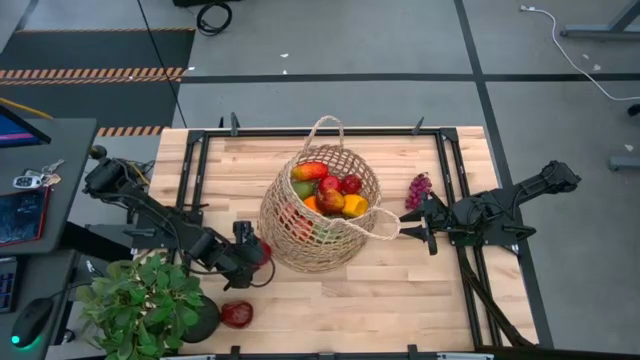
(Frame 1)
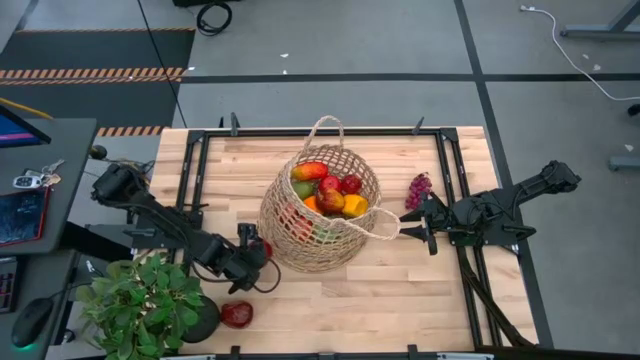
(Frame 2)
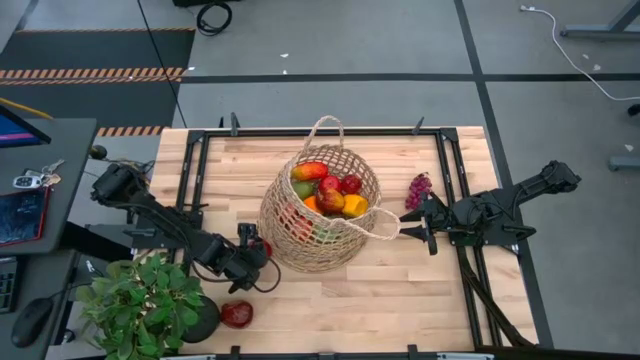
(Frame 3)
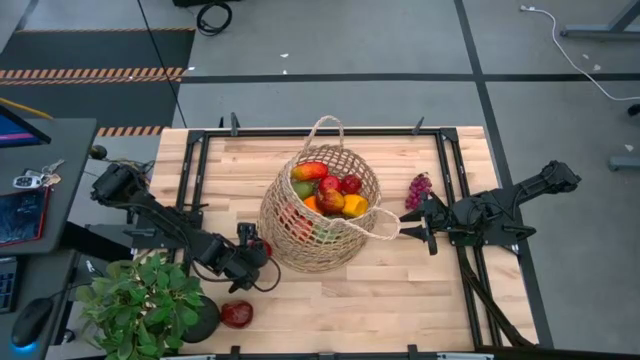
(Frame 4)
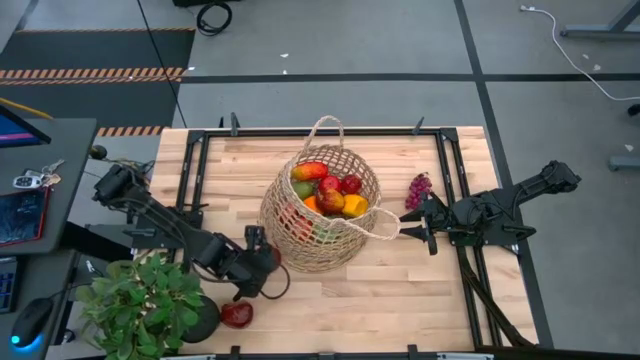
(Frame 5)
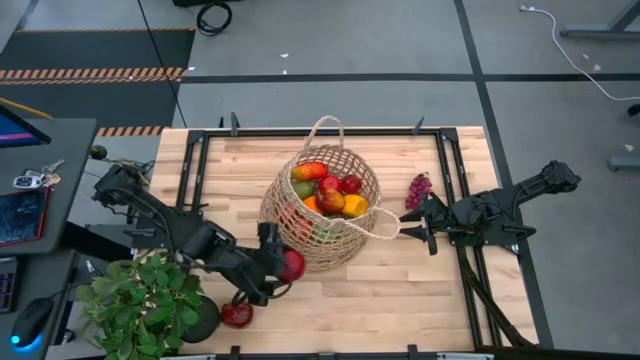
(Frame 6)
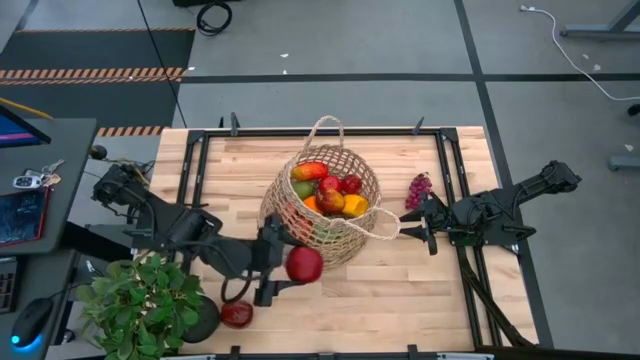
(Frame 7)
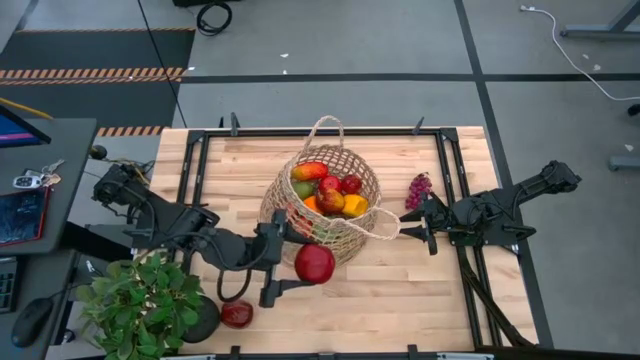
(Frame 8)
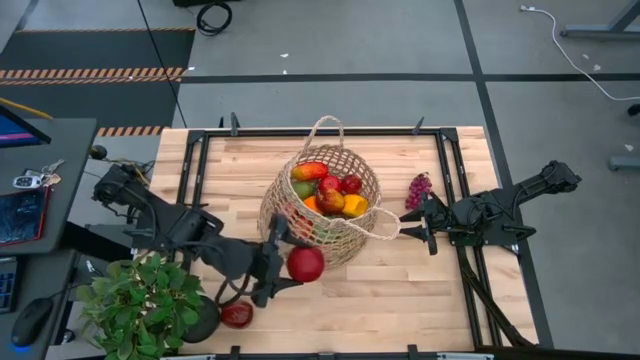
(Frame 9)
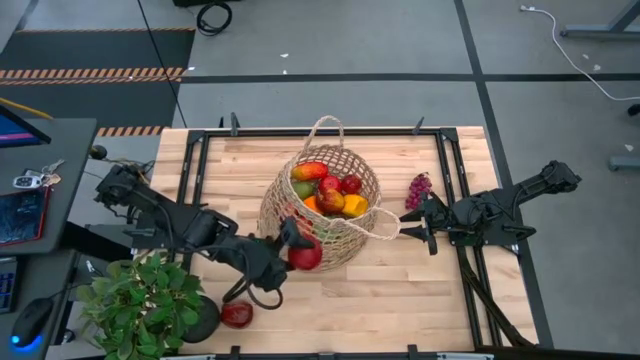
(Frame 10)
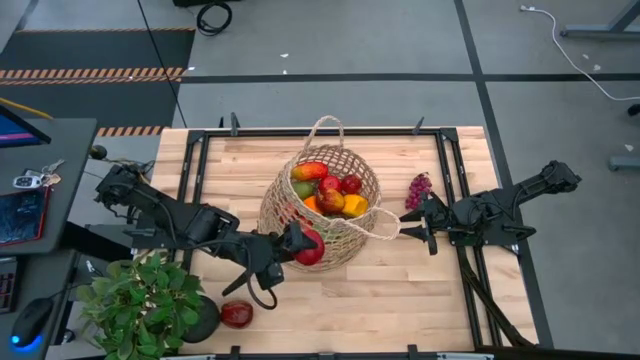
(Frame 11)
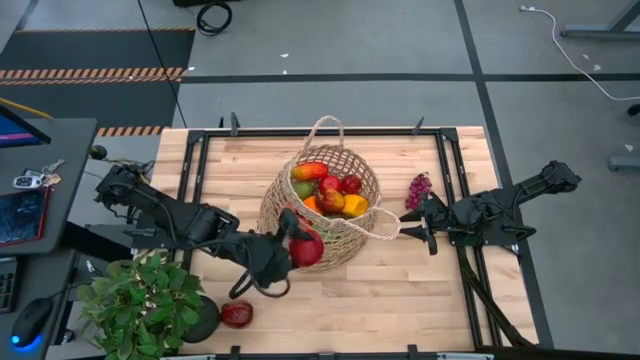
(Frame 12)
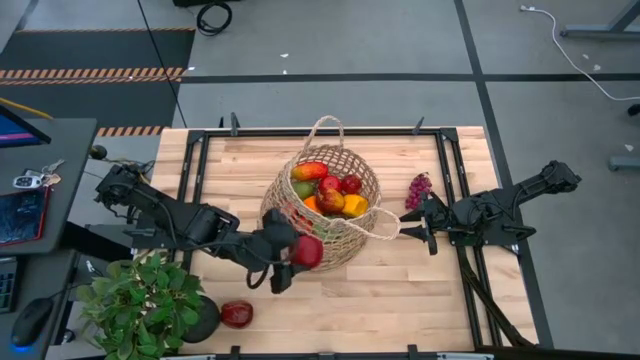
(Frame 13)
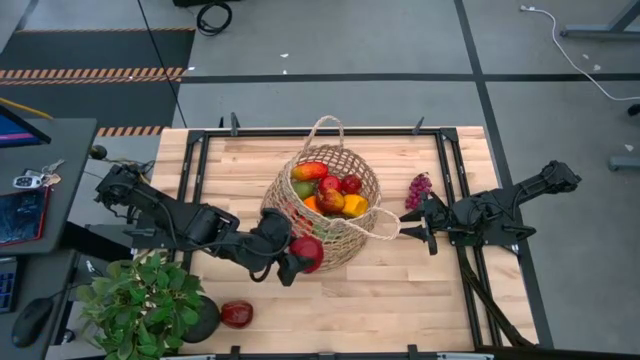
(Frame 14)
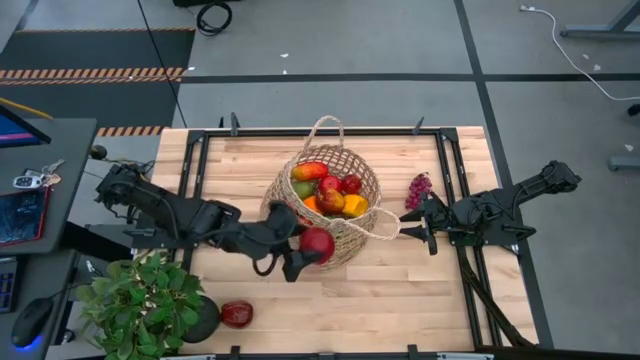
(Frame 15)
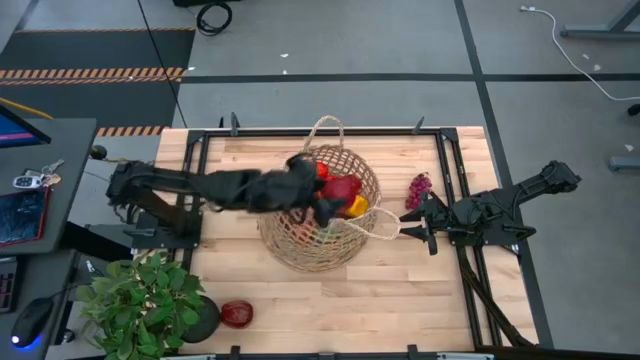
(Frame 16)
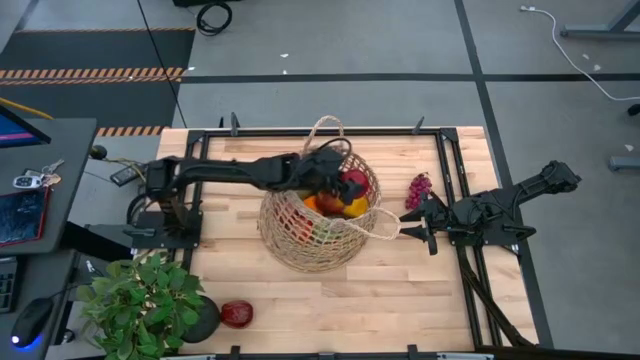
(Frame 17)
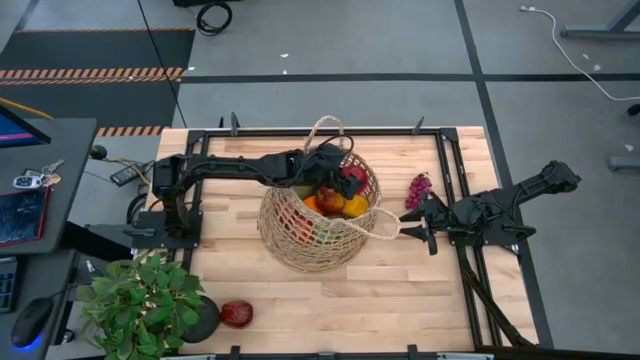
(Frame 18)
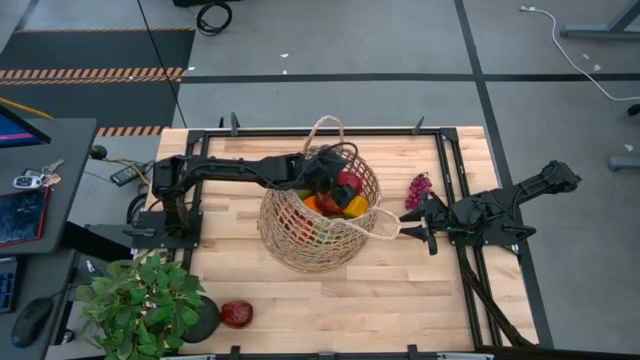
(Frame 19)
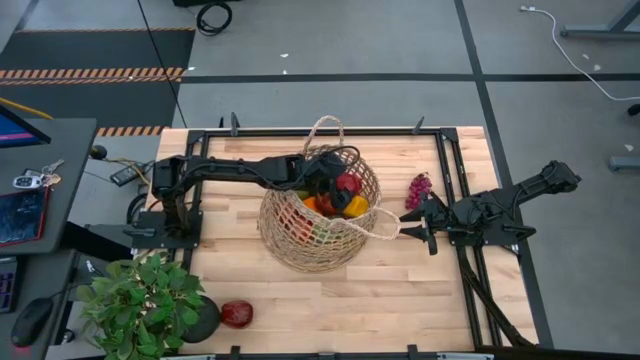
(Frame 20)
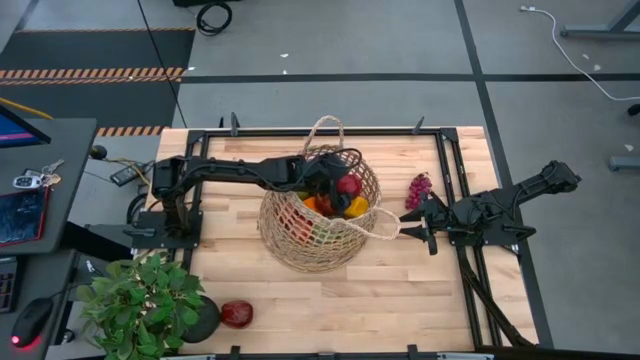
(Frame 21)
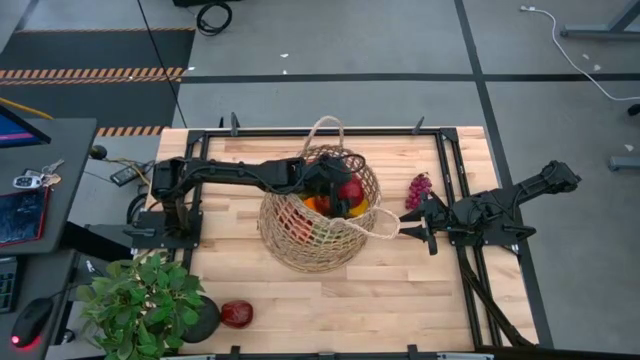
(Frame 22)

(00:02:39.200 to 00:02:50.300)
Task: Build produce basket
Put the pomegranate into the basket

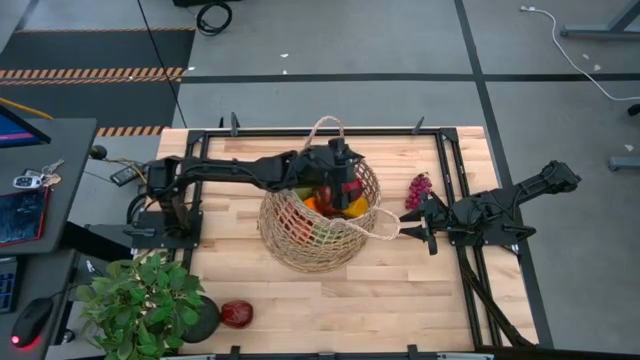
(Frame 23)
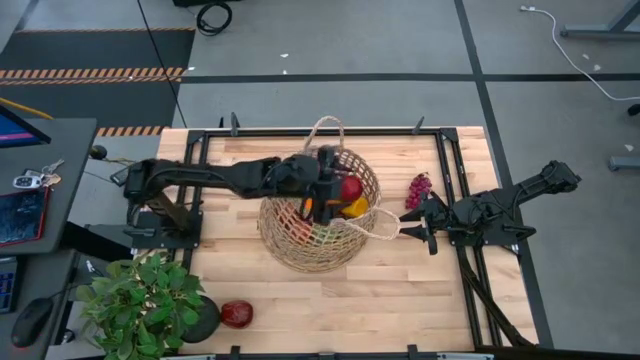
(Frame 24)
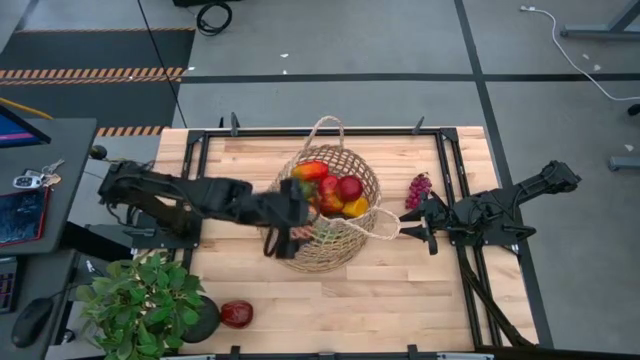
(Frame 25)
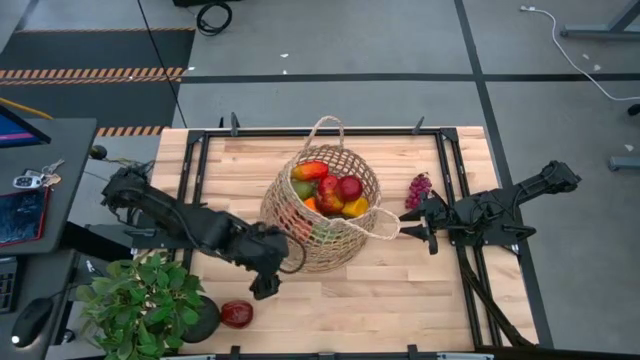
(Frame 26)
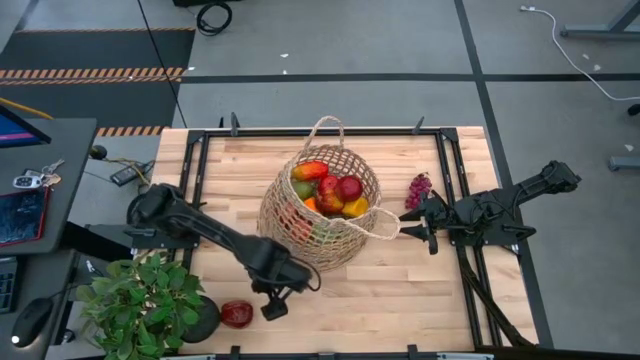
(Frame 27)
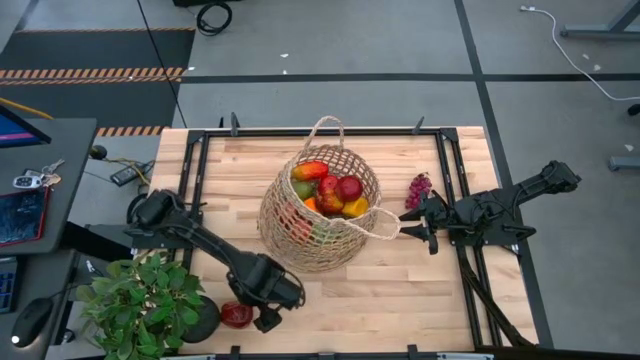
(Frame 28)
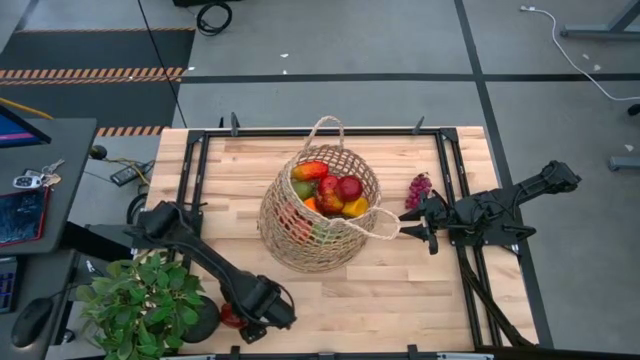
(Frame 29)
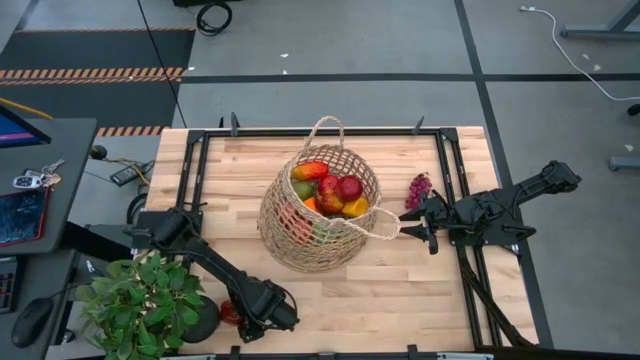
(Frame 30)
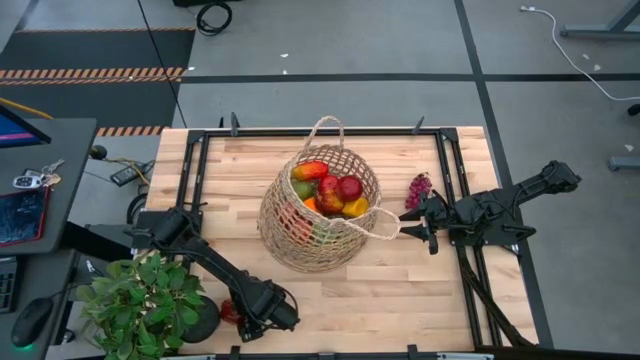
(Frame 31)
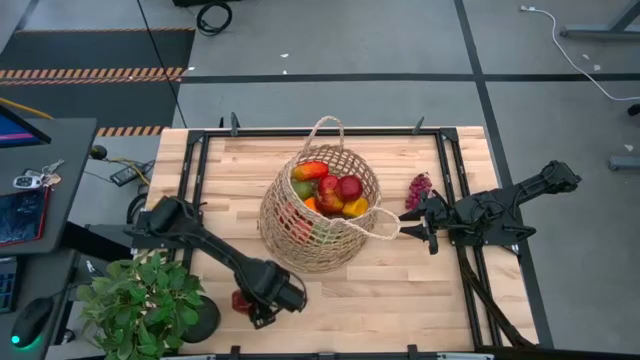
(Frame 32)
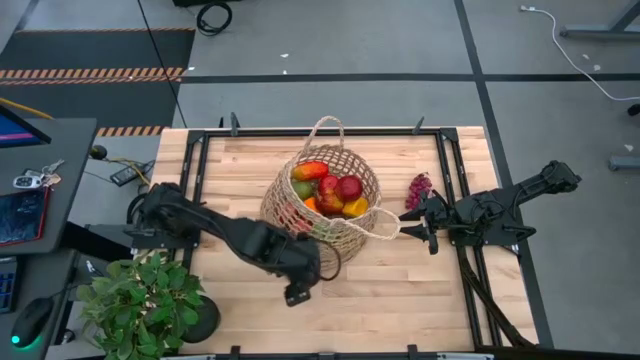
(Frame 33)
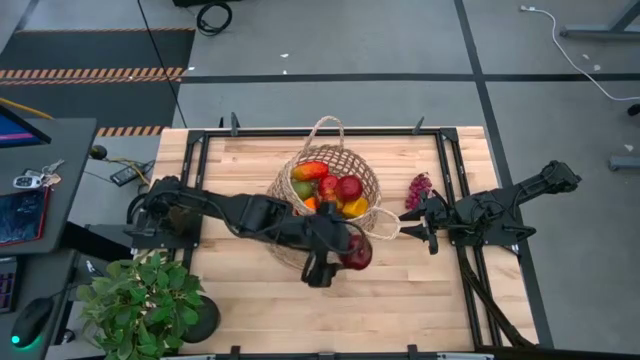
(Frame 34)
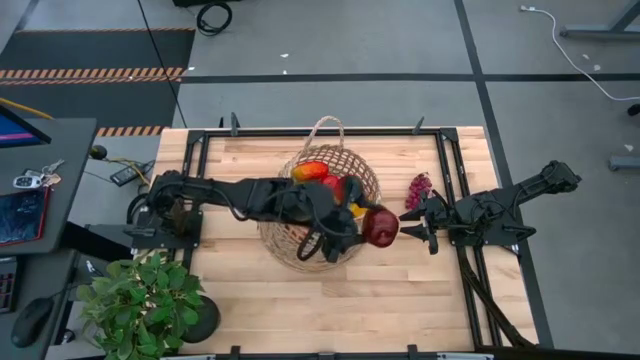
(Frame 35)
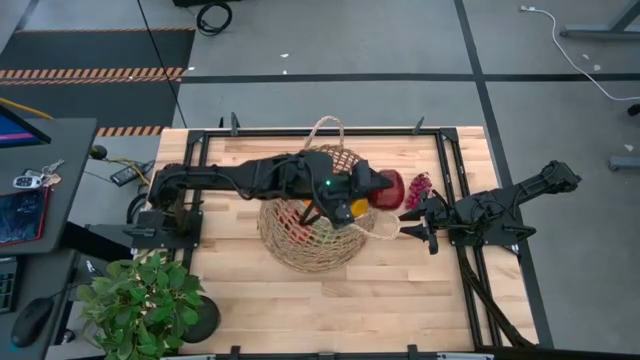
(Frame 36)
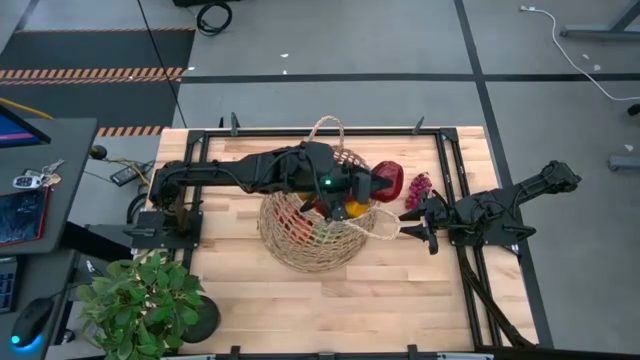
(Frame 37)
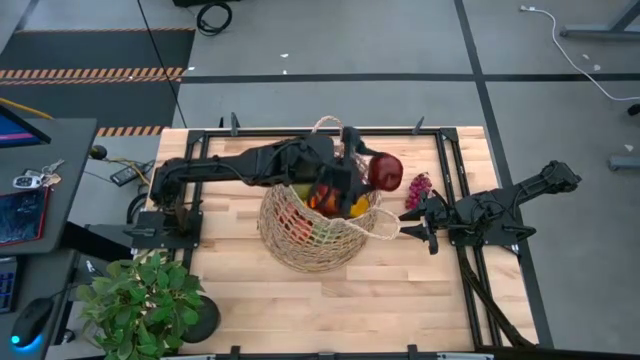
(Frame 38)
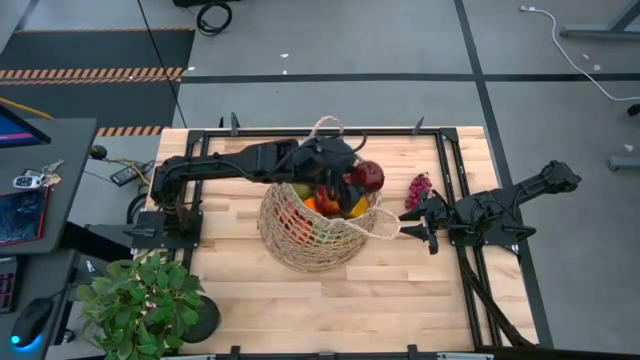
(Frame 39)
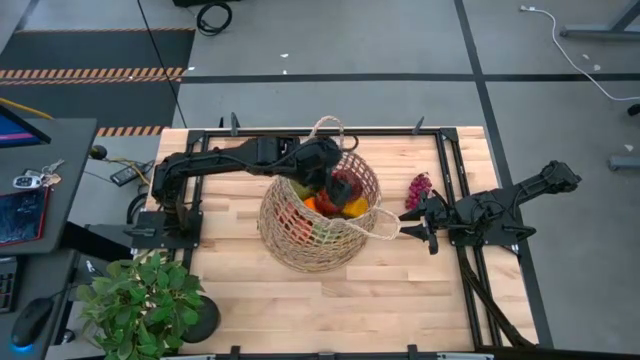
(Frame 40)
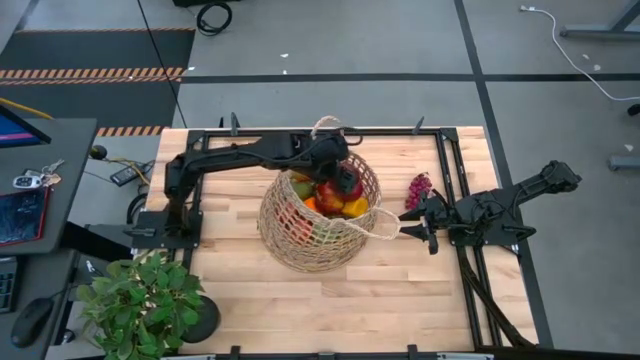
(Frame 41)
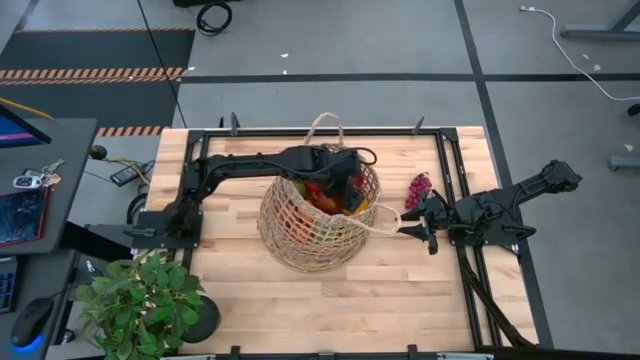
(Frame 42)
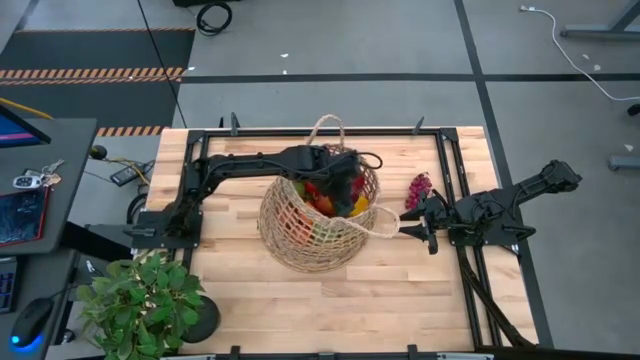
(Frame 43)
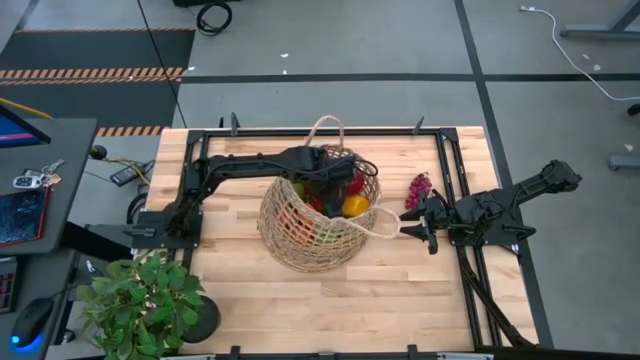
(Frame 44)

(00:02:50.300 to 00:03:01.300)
Put the red apple into the basket
